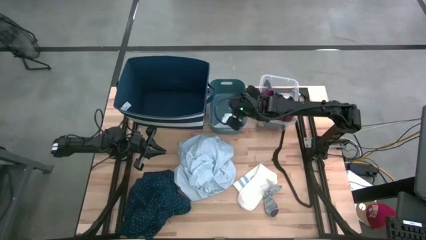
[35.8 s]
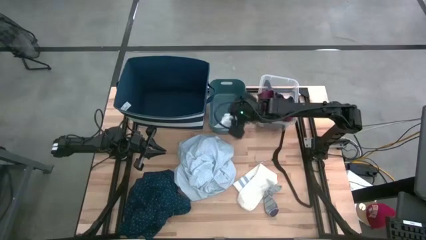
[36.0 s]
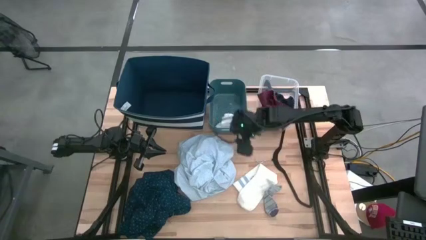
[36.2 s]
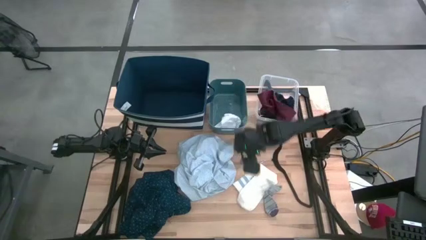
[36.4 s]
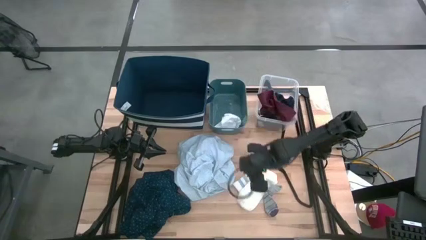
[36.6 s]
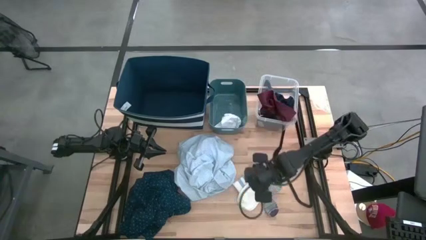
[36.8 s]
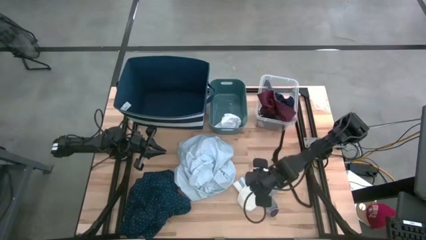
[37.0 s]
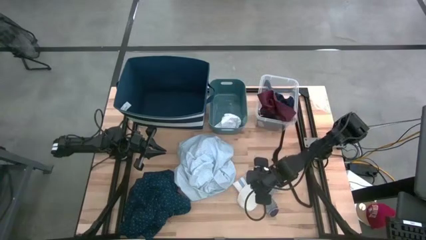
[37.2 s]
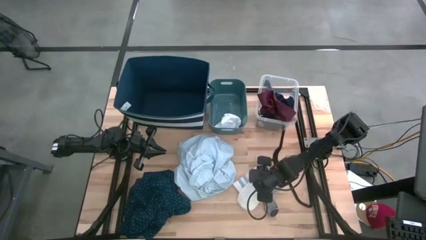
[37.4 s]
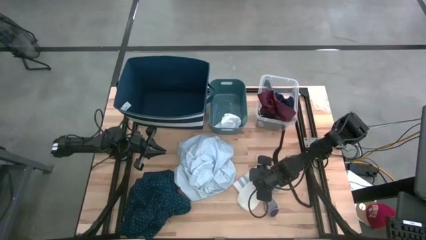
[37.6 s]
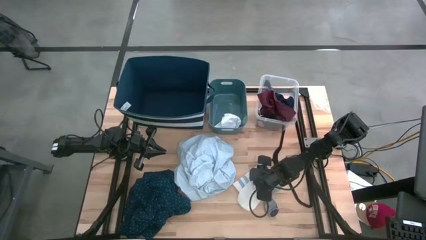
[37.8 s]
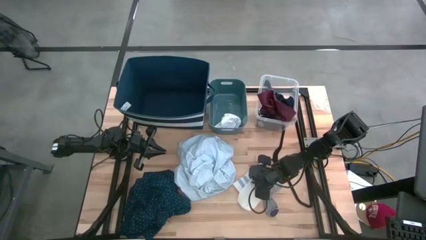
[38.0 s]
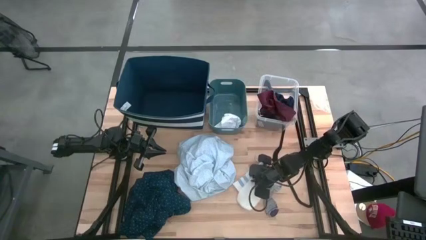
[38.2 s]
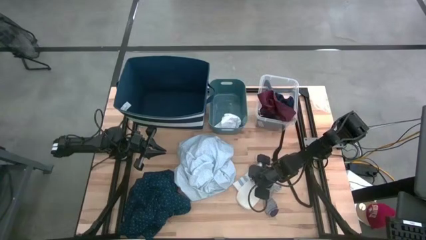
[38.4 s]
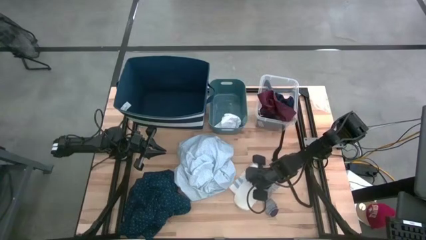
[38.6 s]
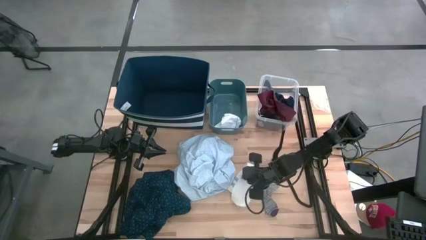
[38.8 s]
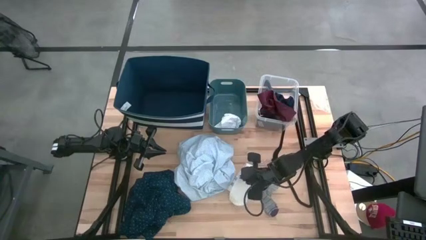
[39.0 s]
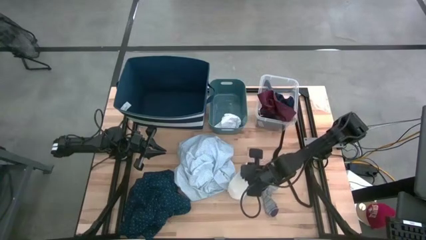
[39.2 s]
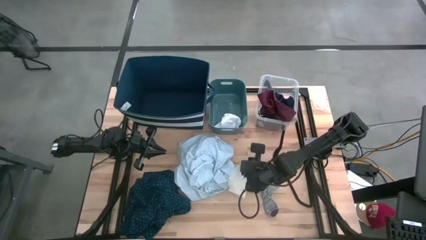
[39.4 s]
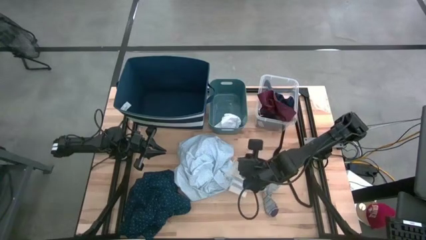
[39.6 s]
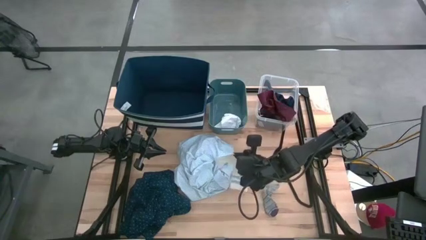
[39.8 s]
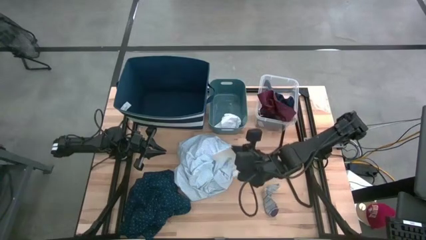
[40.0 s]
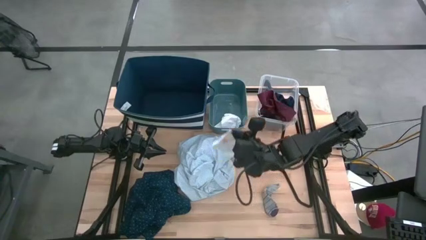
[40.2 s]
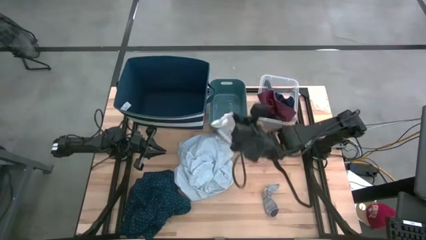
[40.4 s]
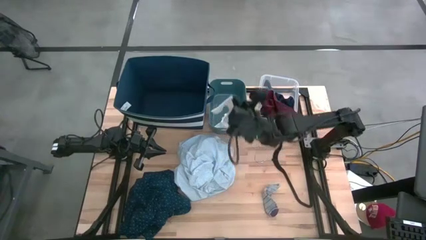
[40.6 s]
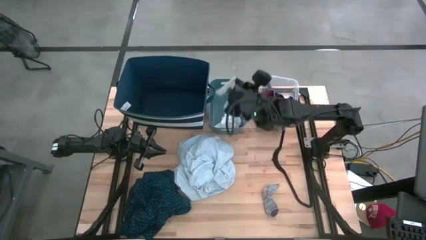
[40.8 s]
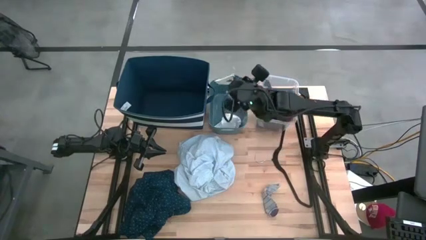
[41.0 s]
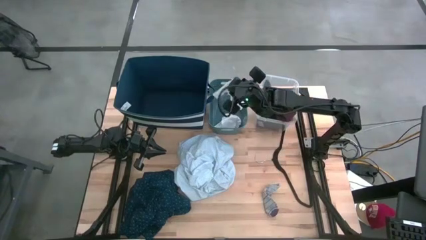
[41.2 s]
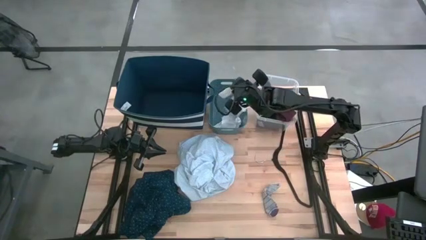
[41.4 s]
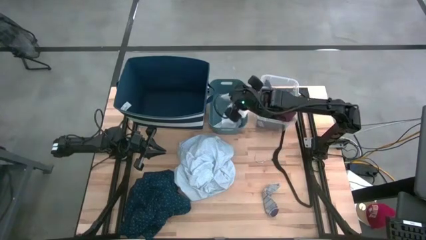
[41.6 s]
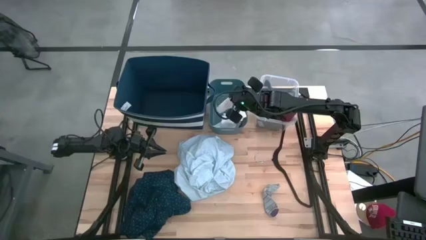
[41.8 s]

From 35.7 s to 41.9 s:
Task: Pick & Place Cloths
Put the white striped sock into the light blue bin

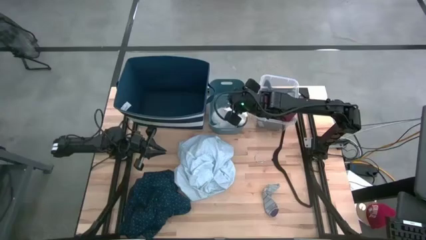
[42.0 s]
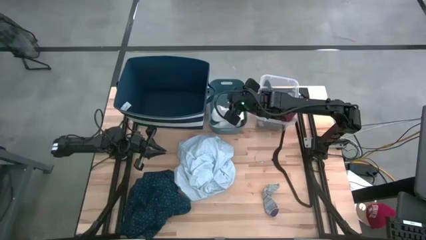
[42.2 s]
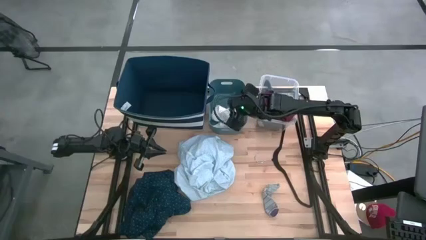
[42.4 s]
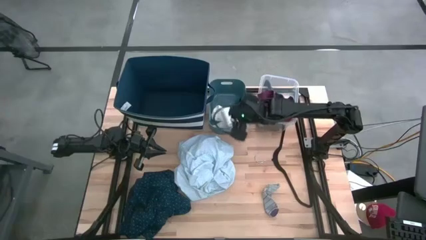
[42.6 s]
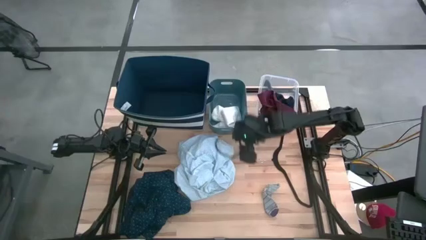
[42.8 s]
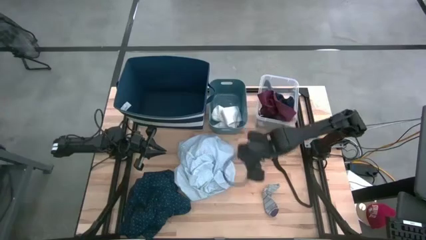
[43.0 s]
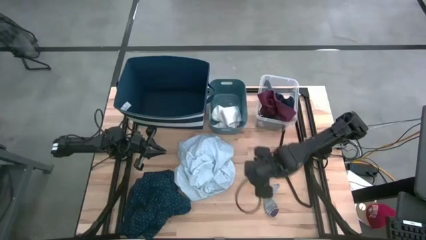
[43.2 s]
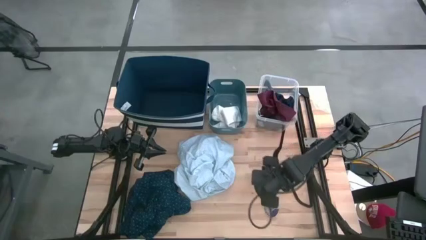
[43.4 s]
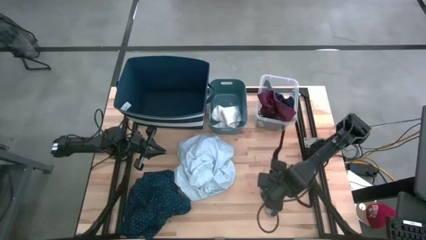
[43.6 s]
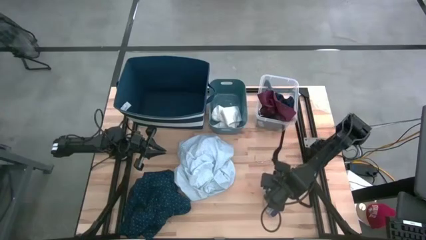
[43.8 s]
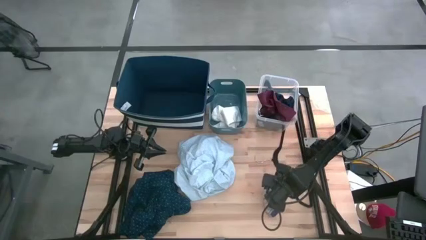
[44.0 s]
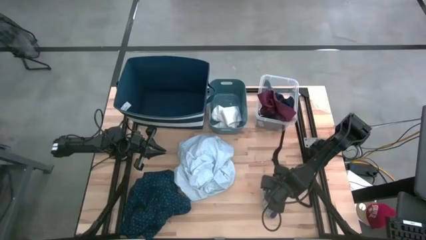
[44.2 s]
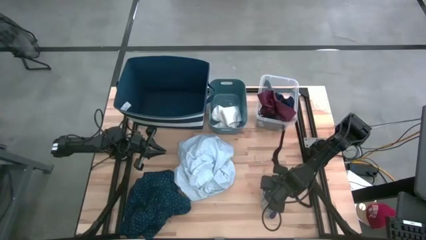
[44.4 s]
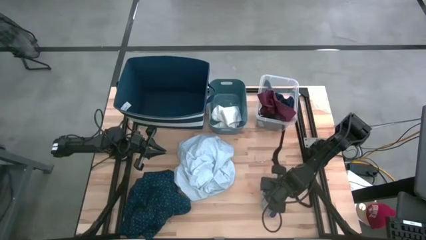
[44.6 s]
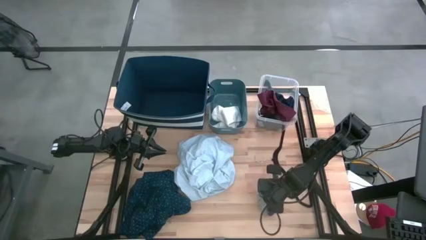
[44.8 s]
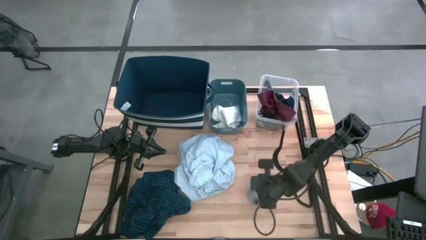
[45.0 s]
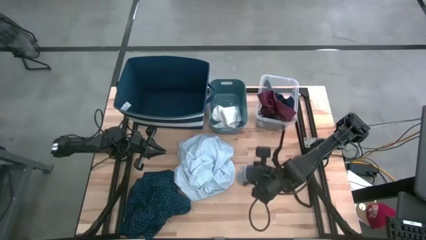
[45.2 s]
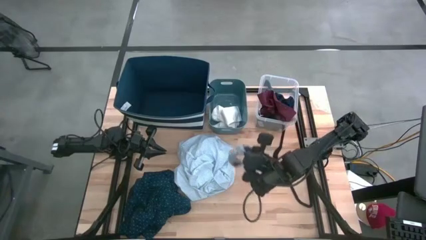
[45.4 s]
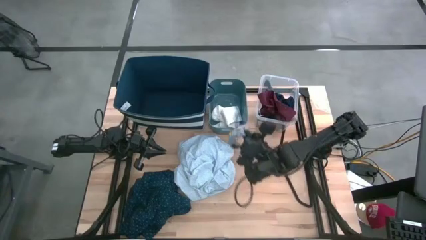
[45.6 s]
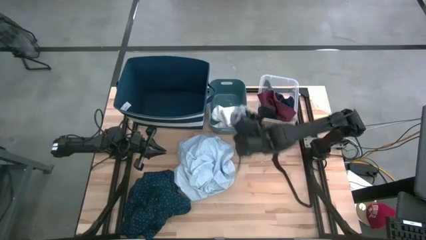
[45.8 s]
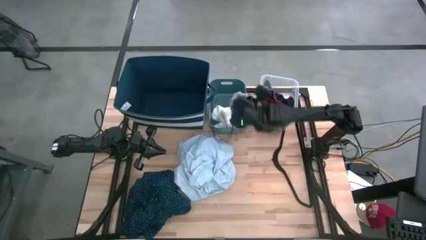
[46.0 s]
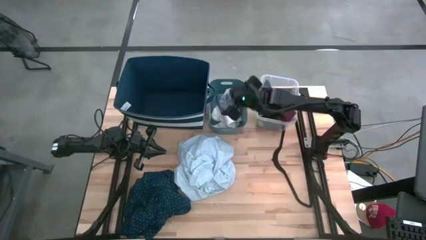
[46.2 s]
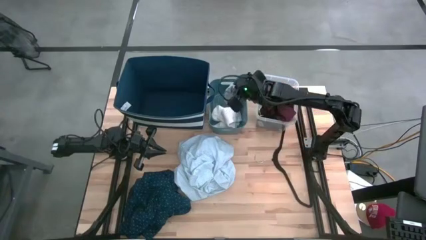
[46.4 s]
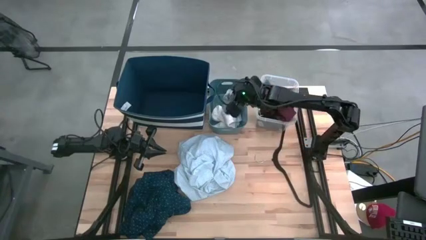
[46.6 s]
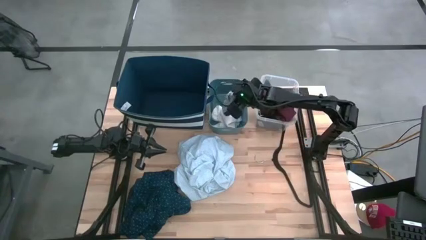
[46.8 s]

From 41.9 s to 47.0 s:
Put the gray sock into the light blue bin

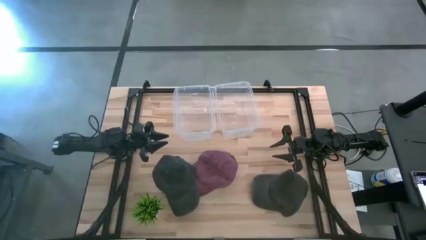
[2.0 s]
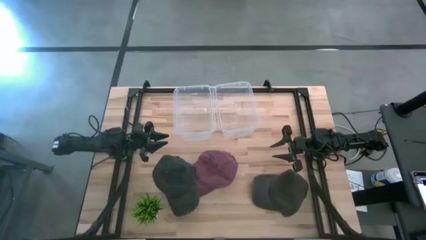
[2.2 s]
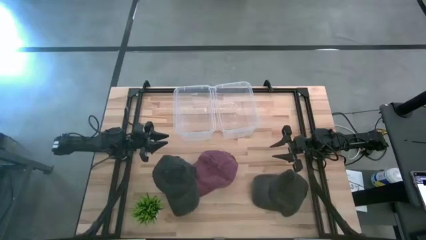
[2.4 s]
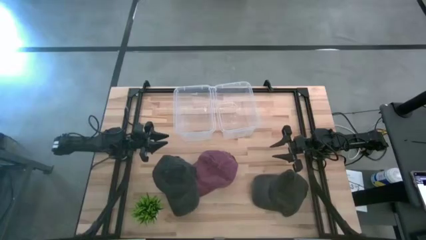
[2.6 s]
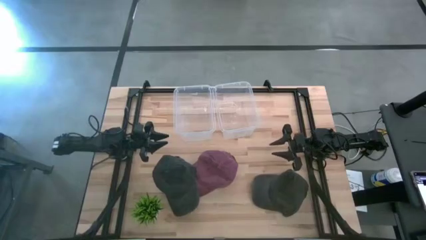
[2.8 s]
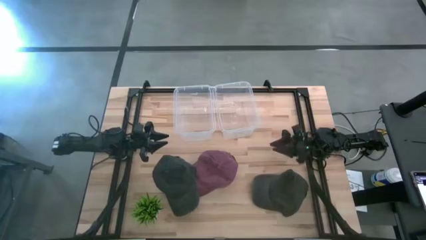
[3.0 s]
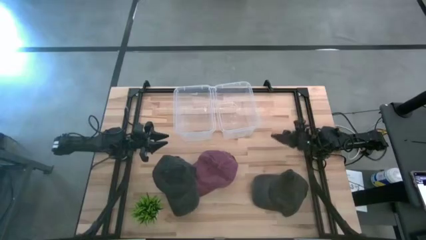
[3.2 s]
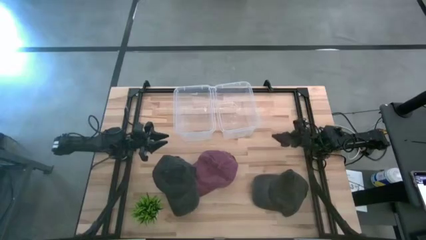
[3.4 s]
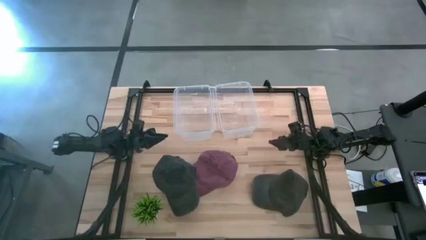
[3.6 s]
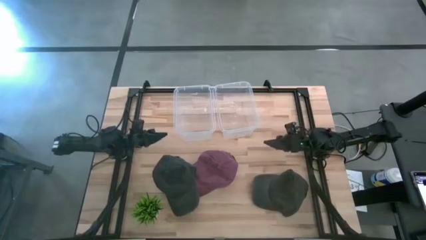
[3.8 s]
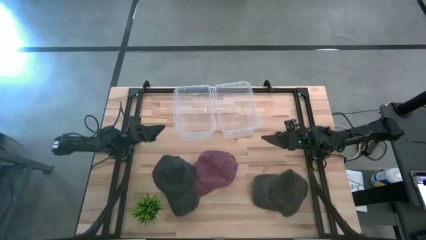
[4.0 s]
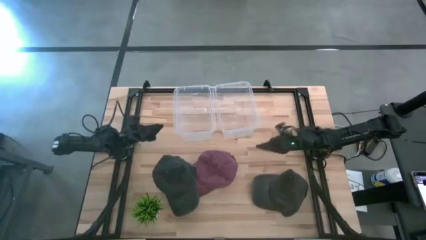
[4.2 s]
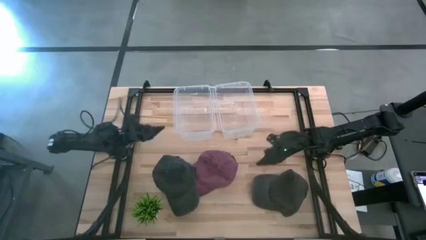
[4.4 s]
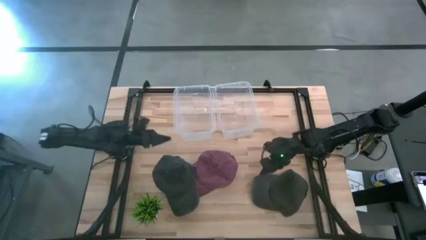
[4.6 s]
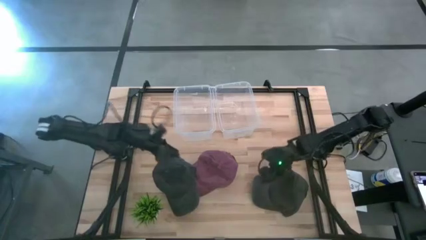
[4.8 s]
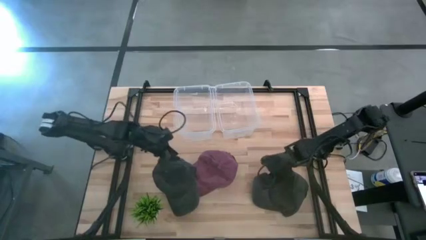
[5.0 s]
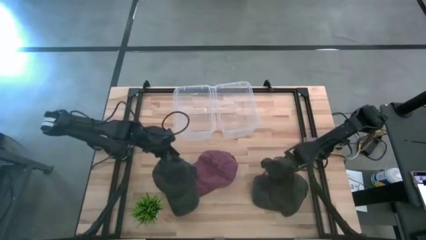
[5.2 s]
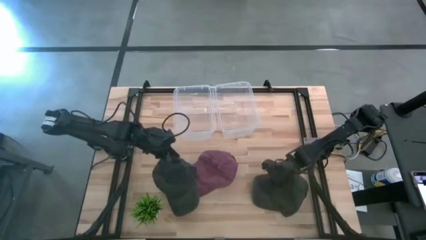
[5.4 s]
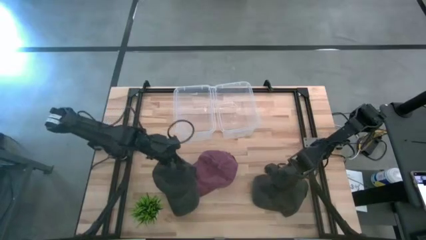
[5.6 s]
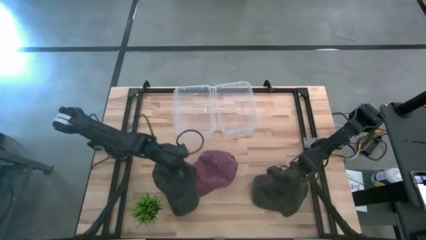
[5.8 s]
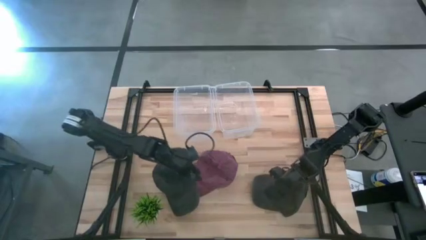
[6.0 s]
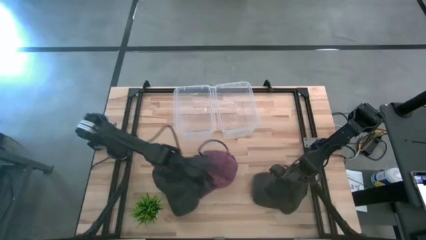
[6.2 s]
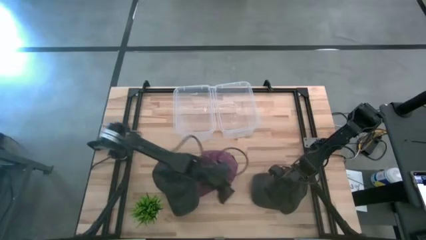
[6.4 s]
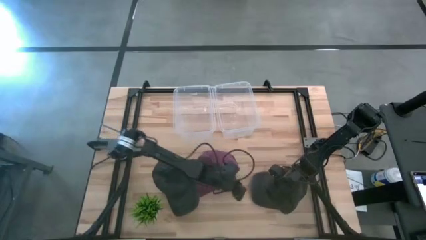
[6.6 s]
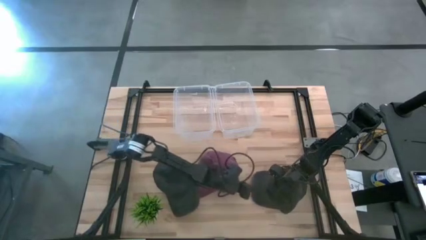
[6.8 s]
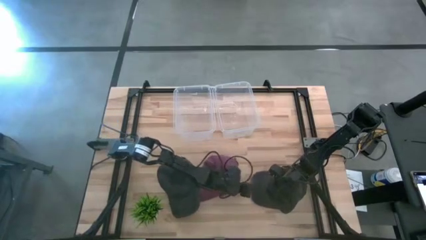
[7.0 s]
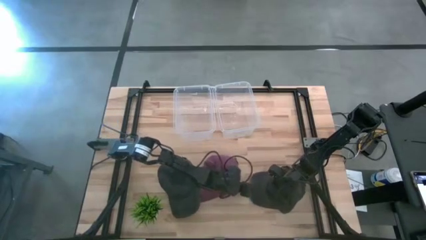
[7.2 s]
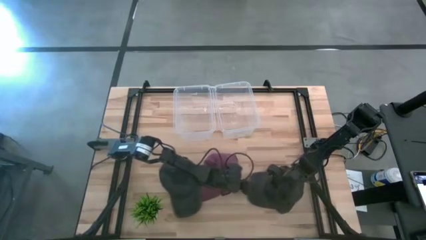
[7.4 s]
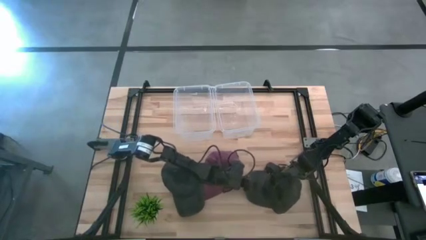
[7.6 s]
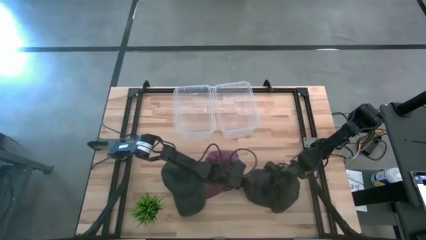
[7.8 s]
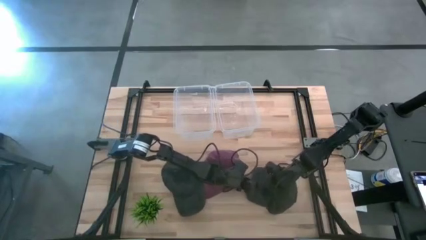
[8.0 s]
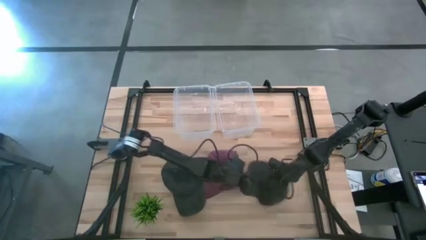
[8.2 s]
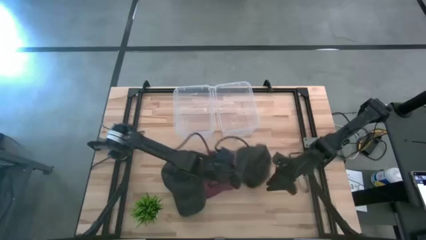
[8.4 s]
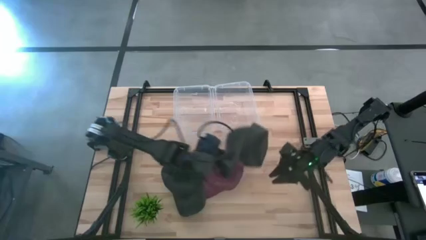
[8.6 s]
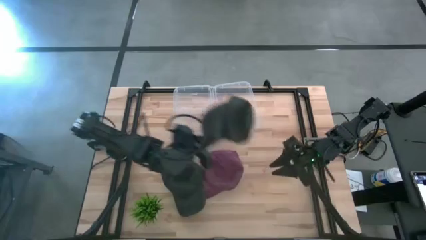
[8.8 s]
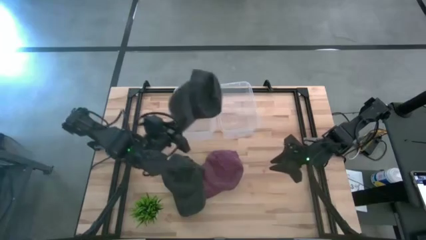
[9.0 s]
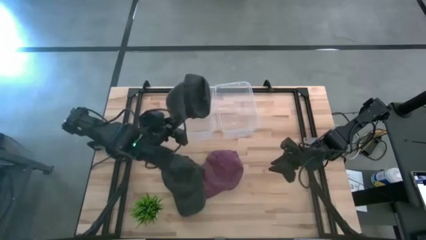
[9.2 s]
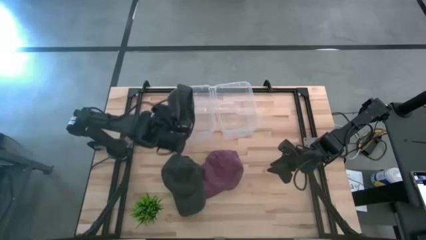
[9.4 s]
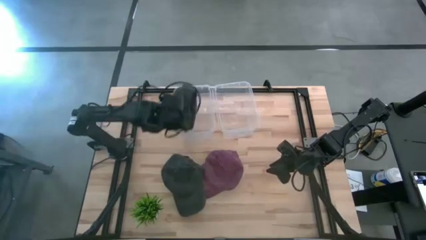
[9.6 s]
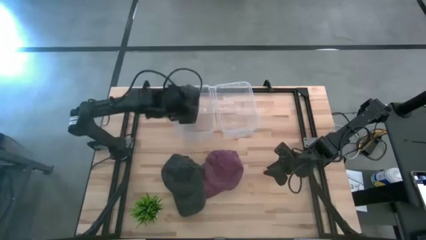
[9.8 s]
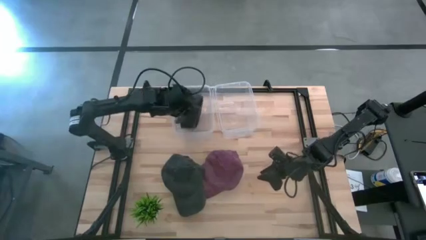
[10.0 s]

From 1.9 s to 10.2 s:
Task: Pick & Place hat
Put the right black cap into the left transparent bin
